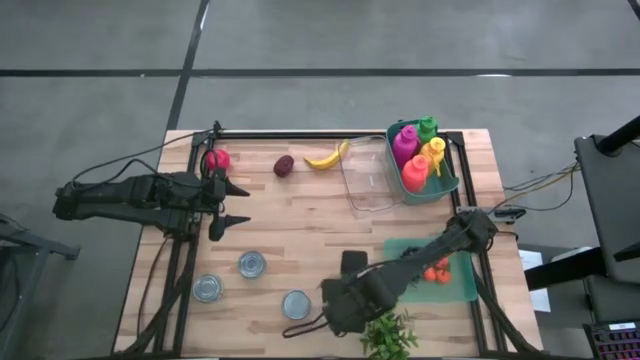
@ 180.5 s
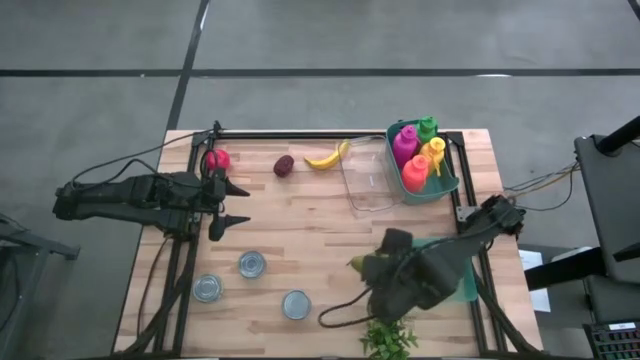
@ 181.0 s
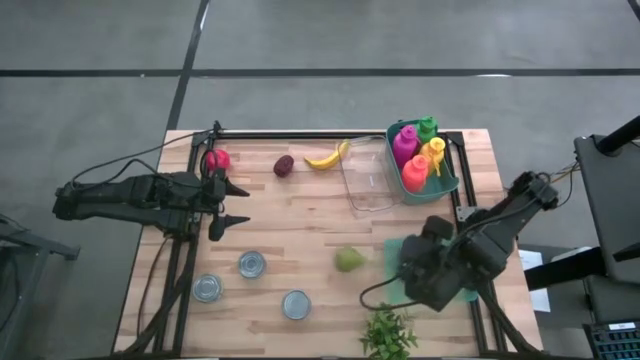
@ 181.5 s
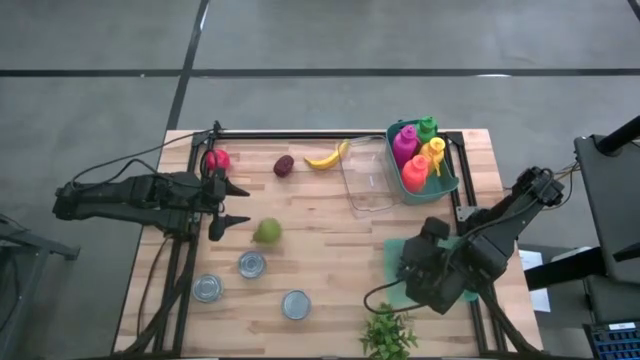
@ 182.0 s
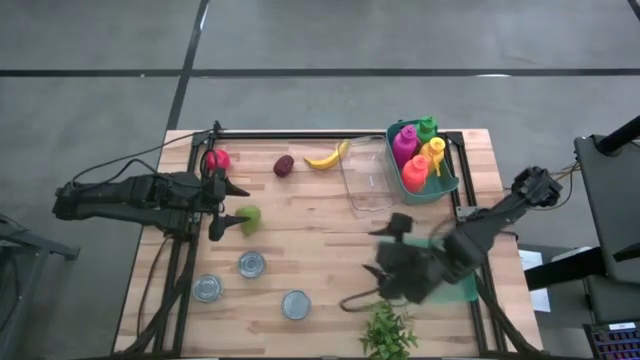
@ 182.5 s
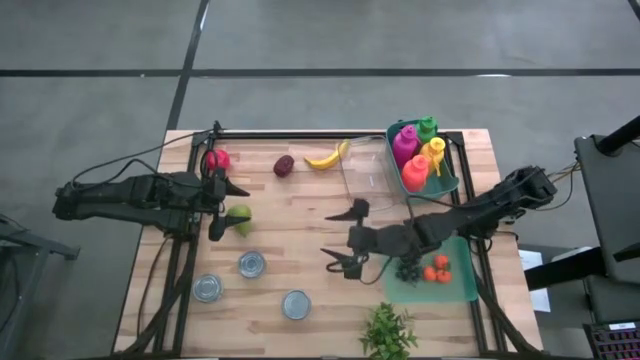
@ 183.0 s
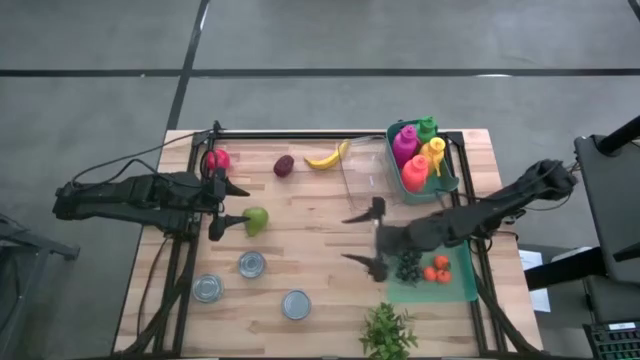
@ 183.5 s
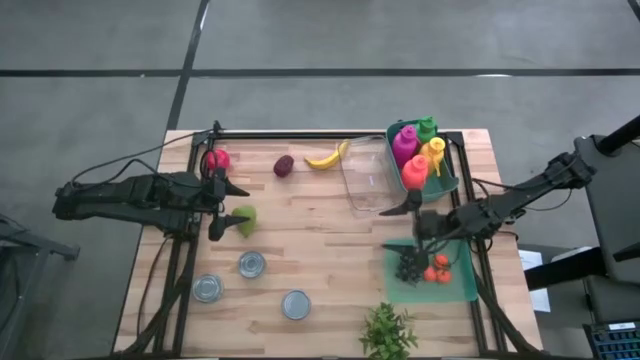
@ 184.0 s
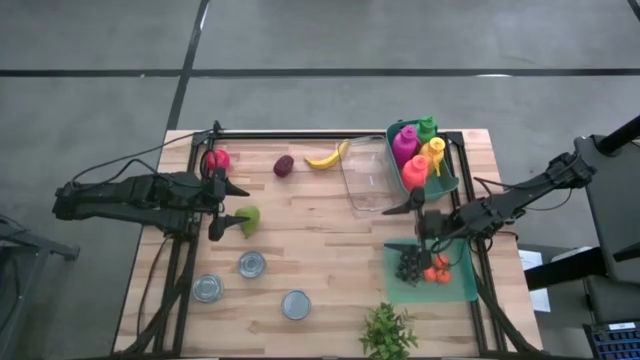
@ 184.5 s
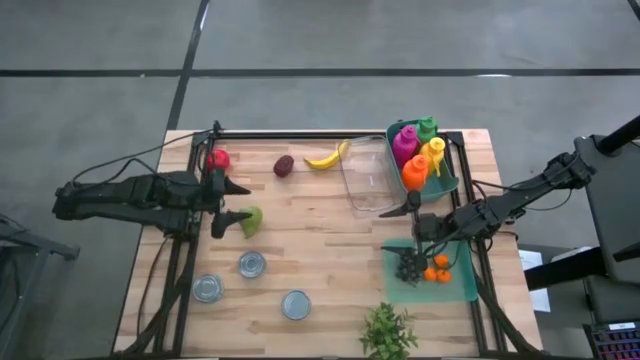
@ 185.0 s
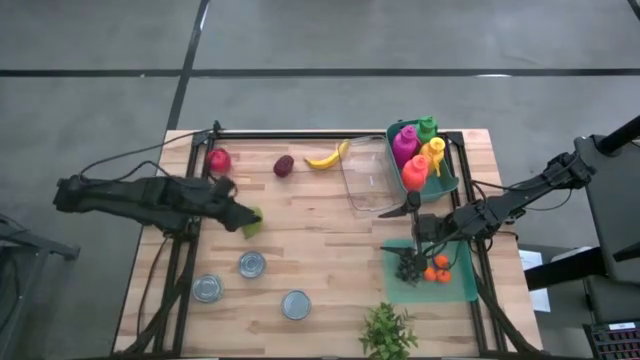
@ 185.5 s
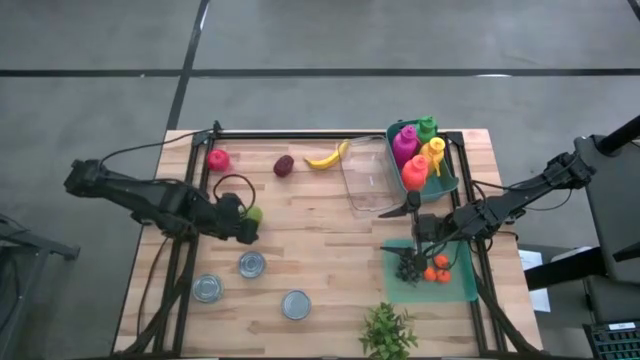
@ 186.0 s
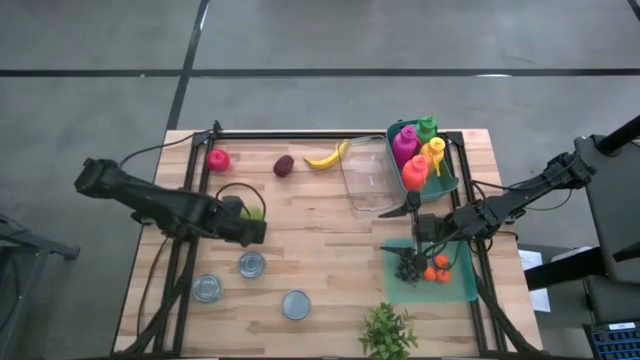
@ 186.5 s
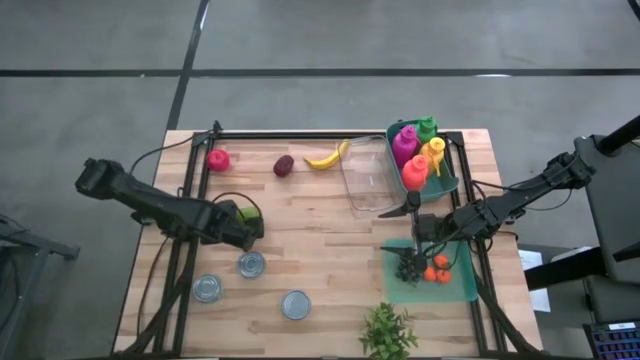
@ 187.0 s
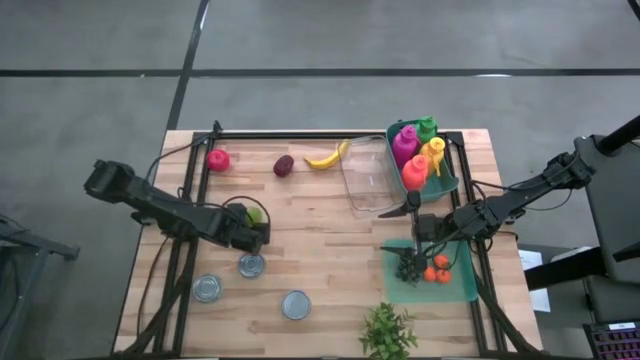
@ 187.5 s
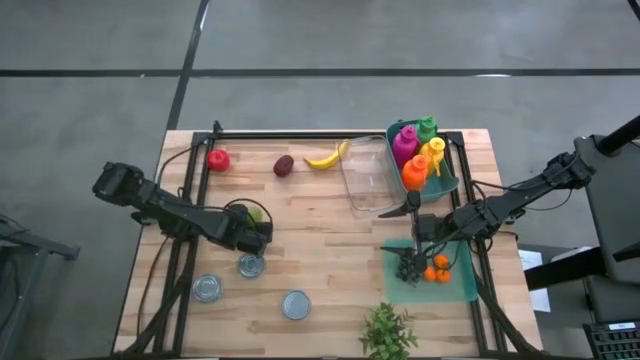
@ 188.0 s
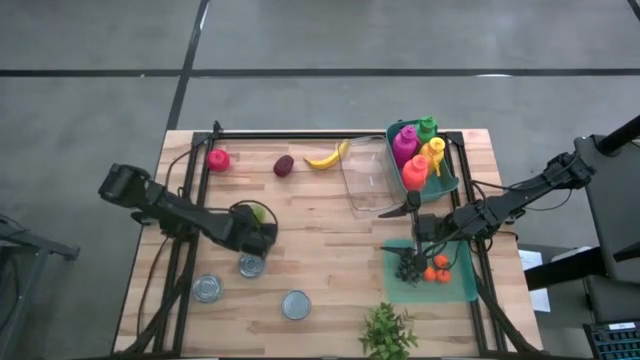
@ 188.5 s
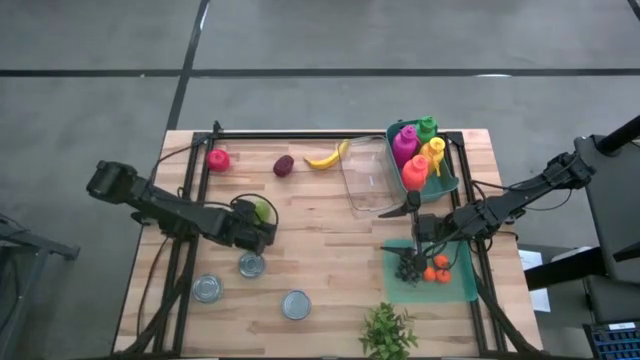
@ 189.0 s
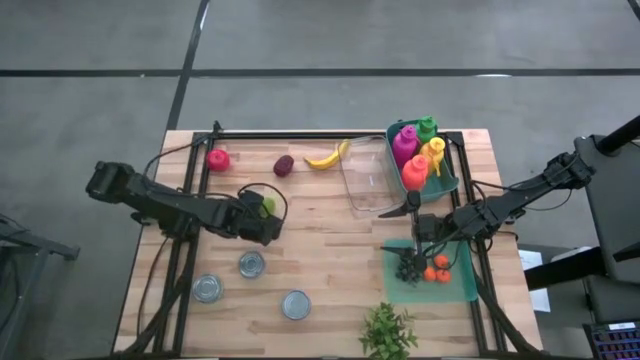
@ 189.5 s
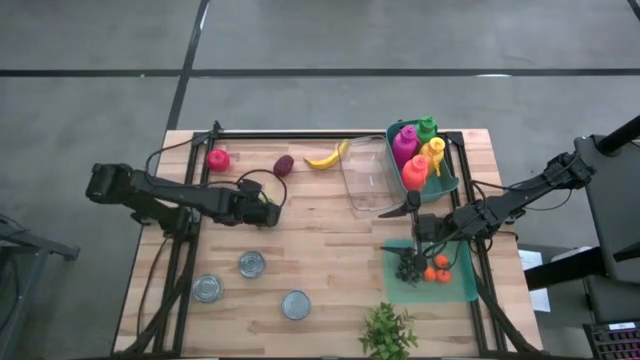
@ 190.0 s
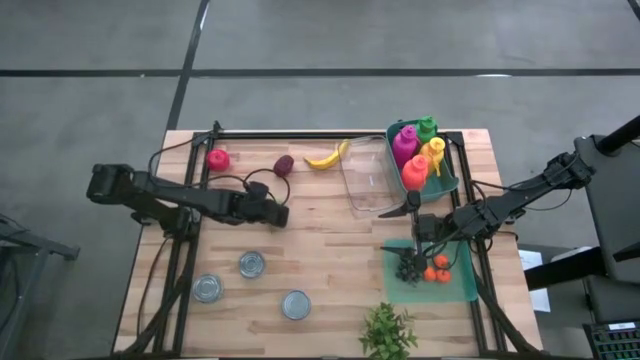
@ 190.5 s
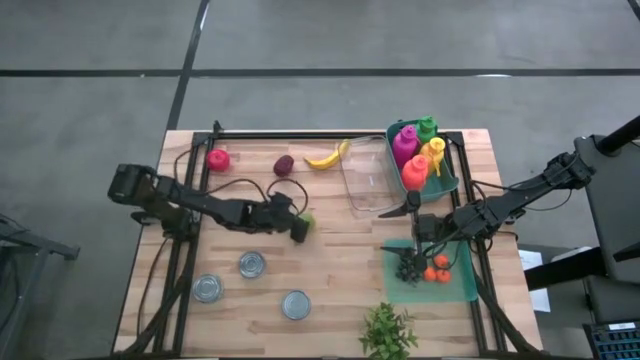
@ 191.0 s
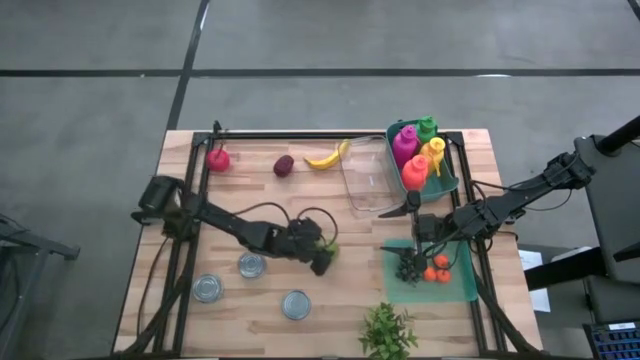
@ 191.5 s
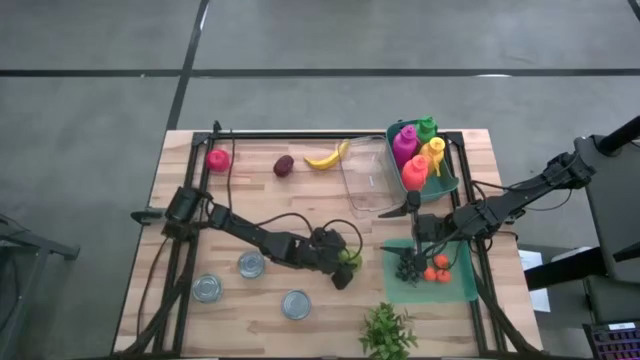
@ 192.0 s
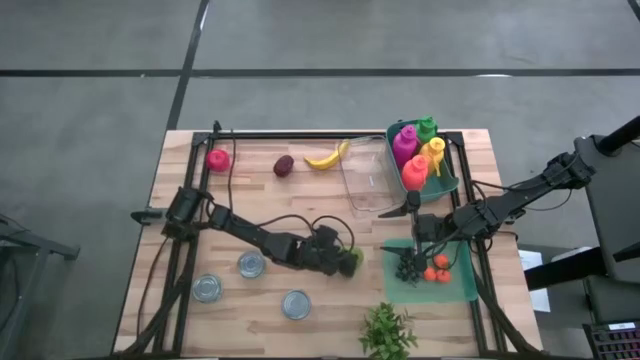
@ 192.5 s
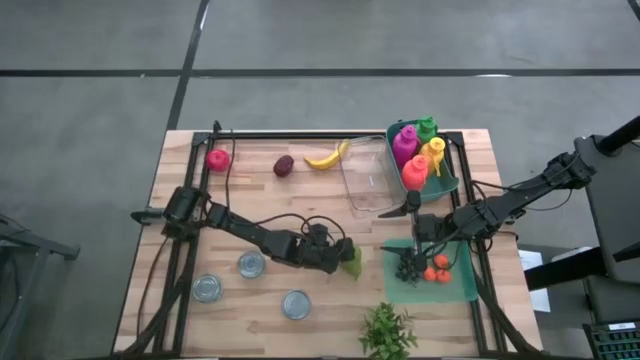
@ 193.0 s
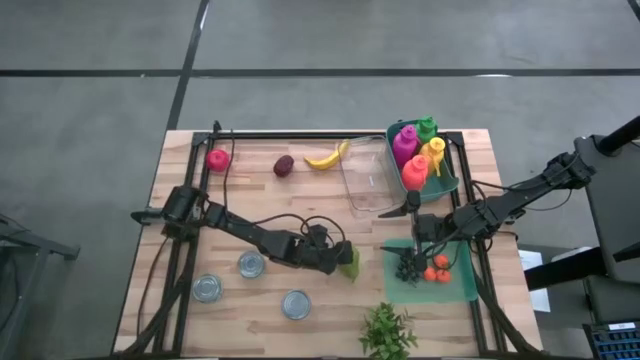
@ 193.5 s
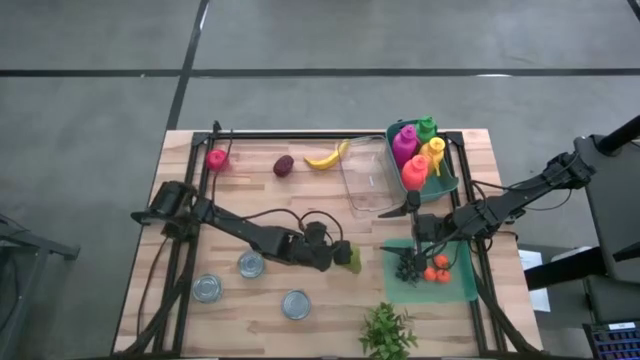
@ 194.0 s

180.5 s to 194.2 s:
Task: Pick & Place Food Item
Put the pear into the green transparent bin

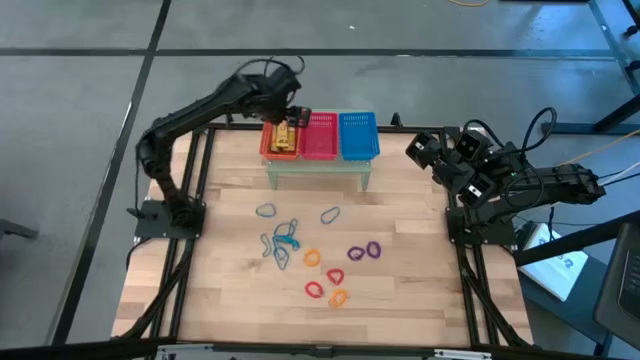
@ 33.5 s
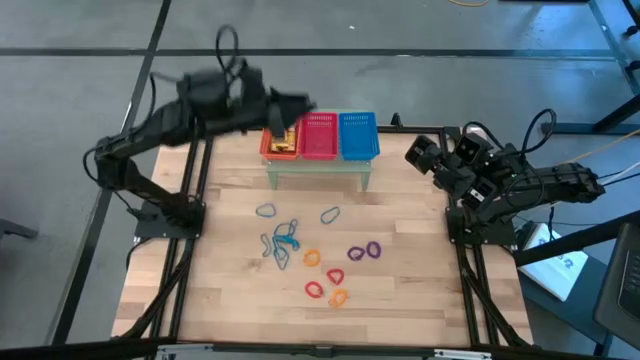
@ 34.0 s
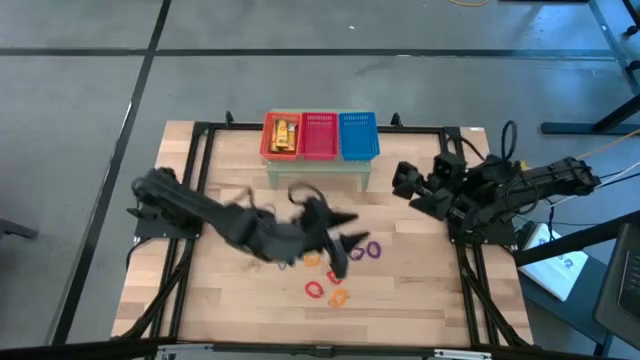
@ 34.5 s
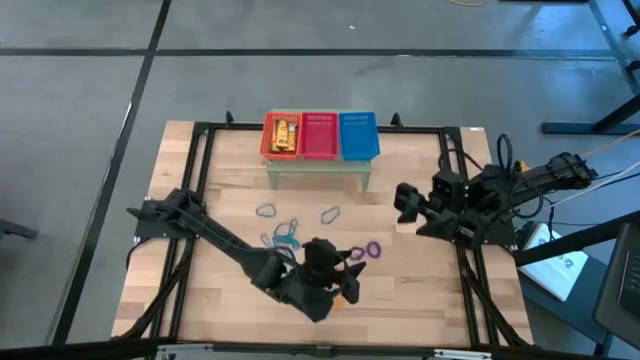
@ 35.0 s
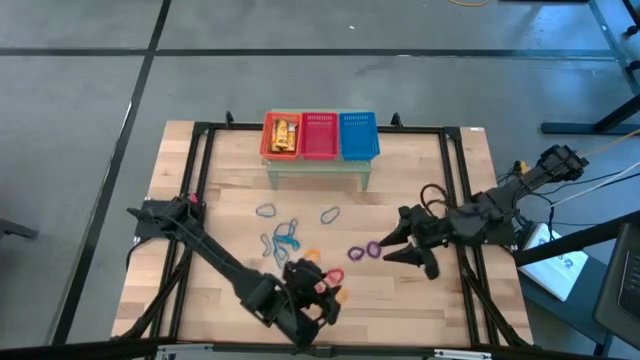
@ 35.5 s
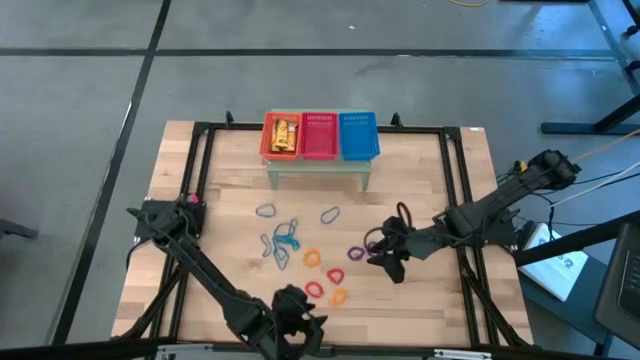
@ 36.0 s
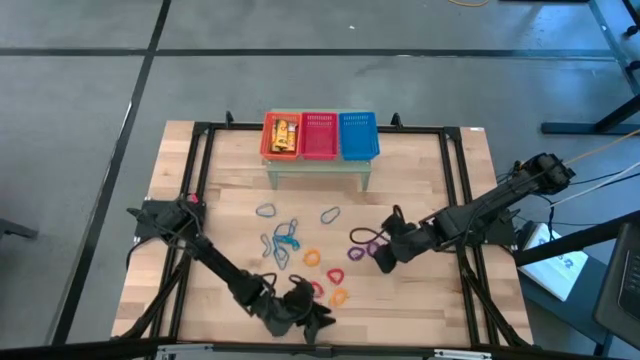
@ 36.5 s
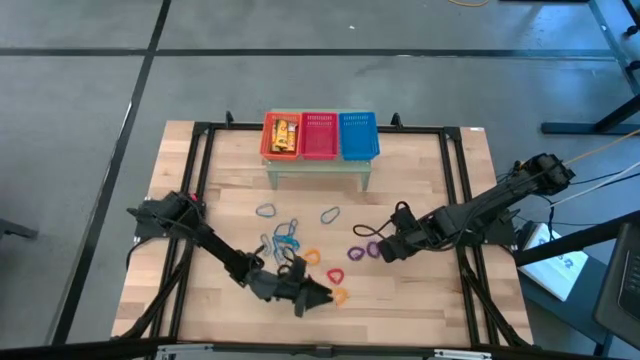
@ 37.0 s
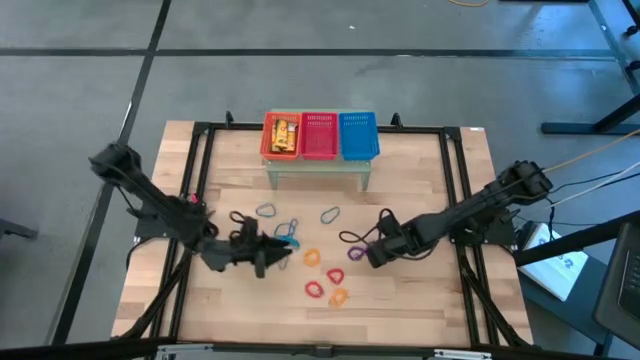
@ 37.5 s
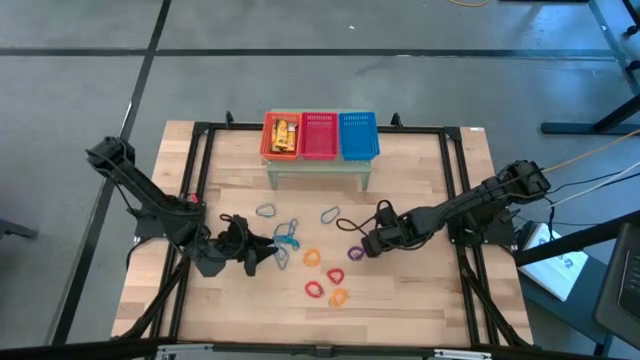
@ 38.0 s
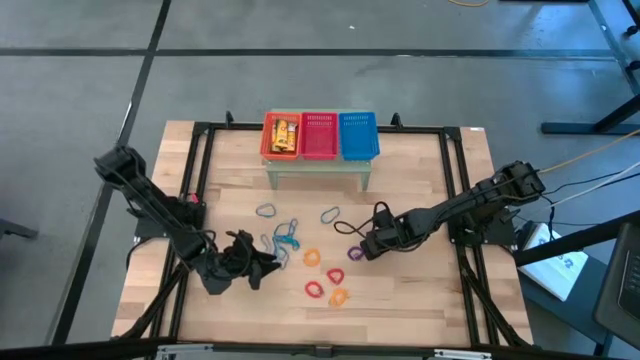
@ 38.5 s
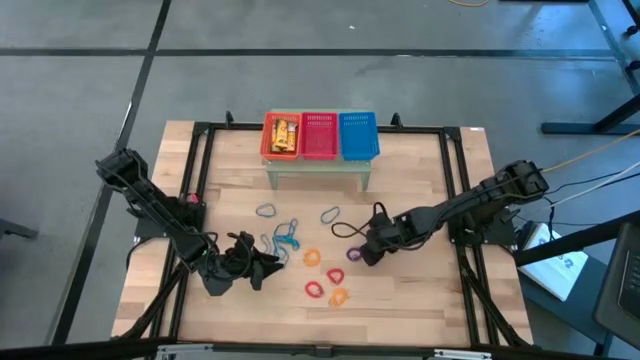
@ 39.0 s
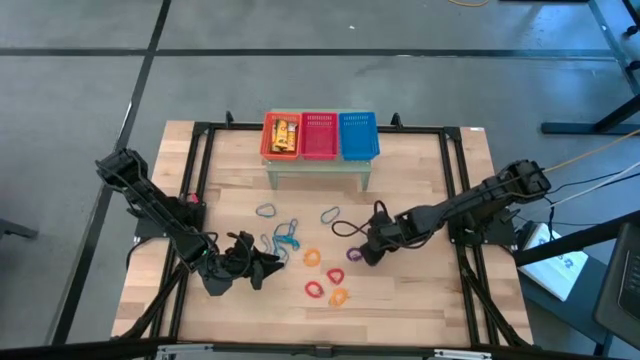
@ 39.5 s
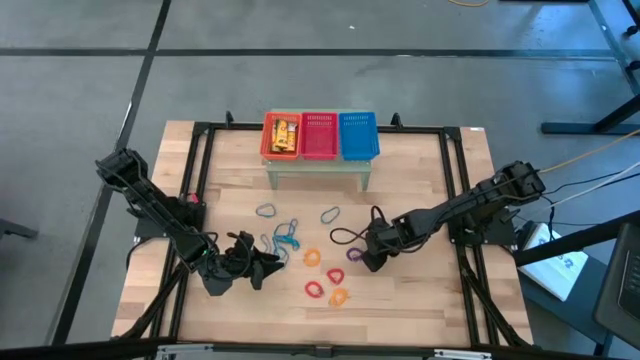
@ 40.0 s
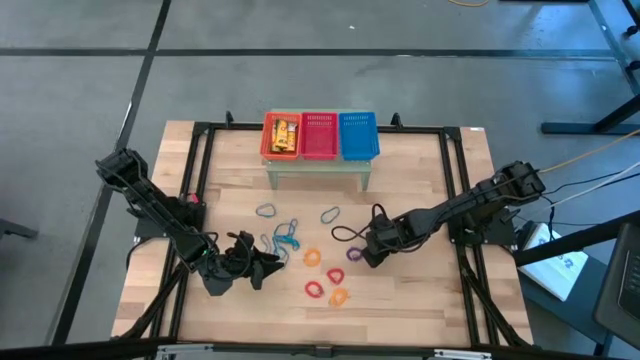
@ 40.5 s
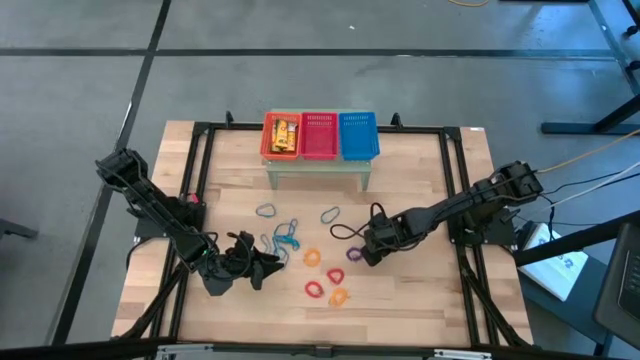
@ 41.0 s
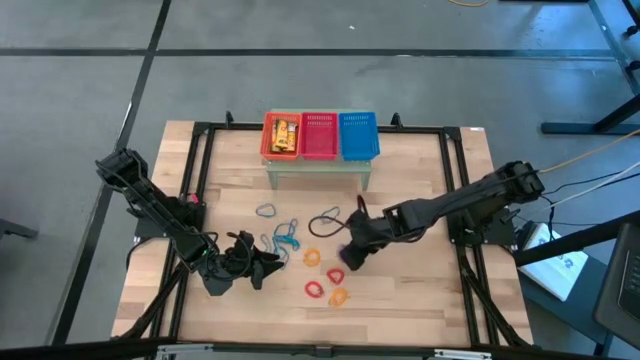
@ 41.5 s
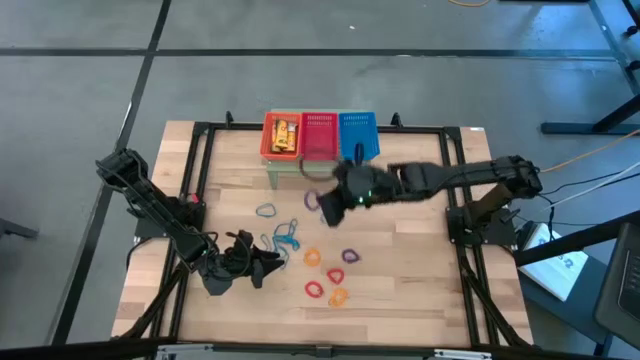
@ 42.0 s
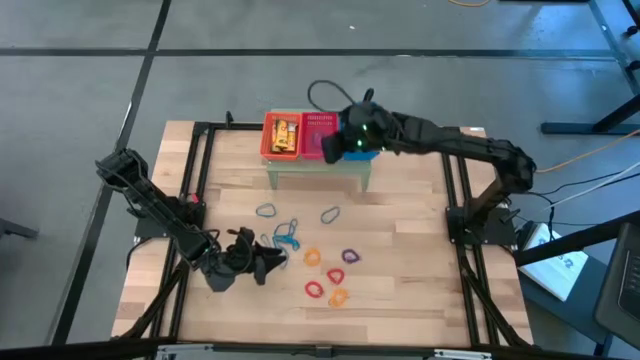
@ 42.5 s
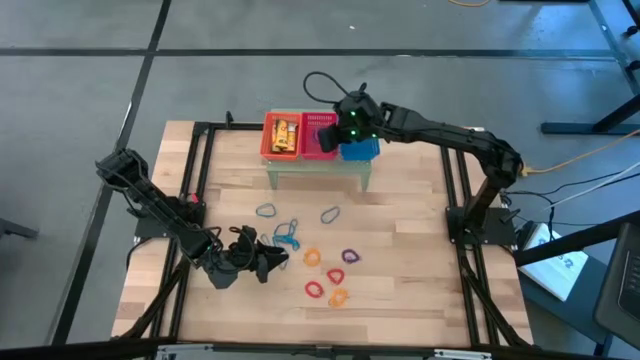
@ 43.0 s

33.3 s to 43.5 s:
Task: Pick & Place Office Desk Supplies
Put the violet spring keychain into the red bin on the shelf
